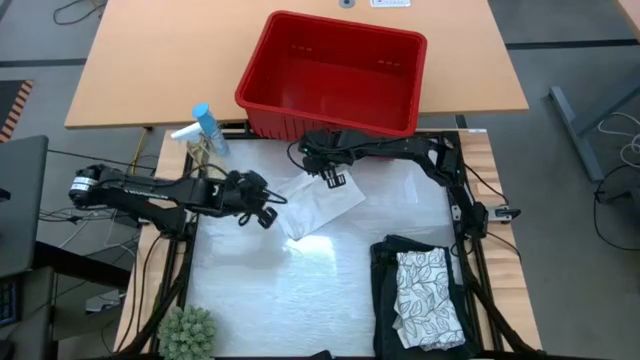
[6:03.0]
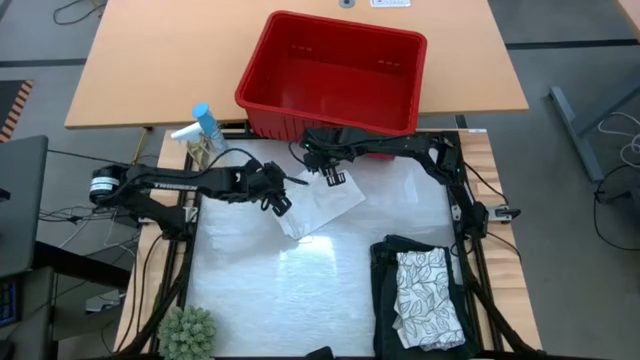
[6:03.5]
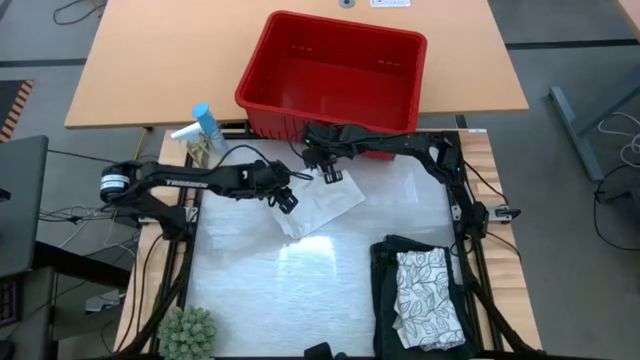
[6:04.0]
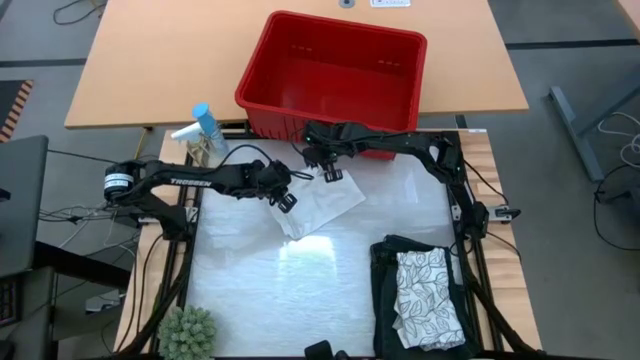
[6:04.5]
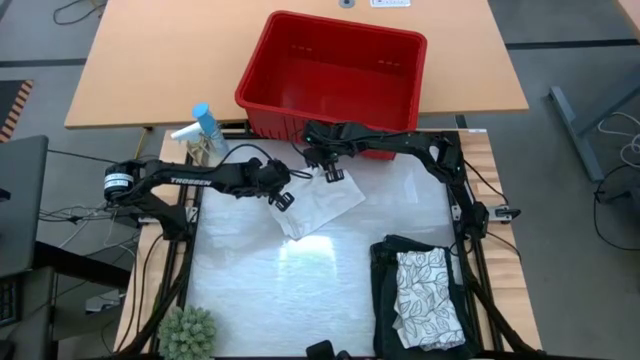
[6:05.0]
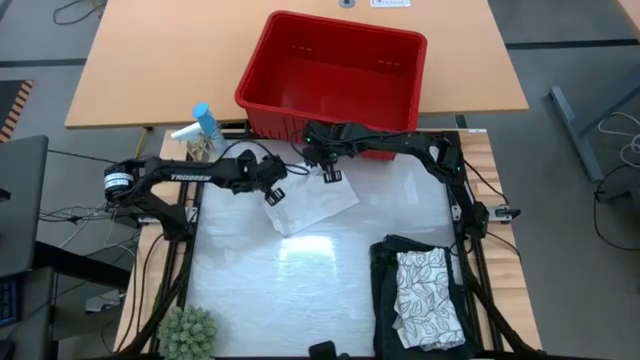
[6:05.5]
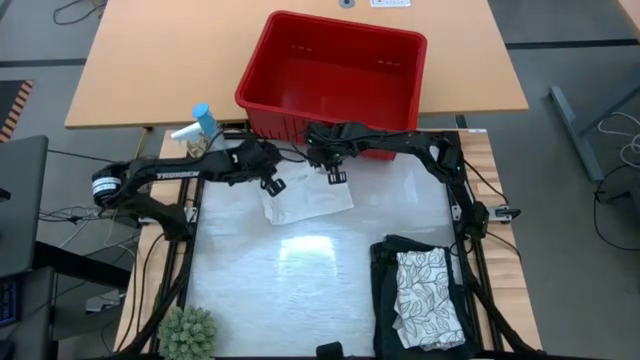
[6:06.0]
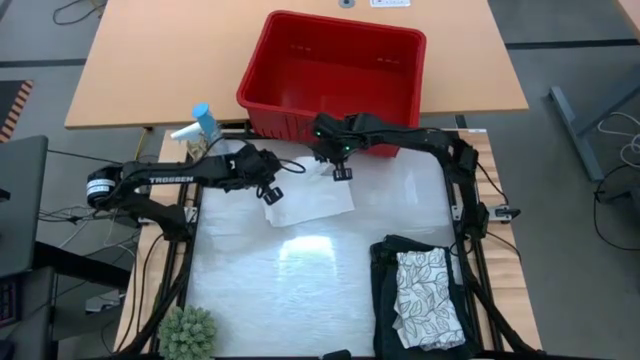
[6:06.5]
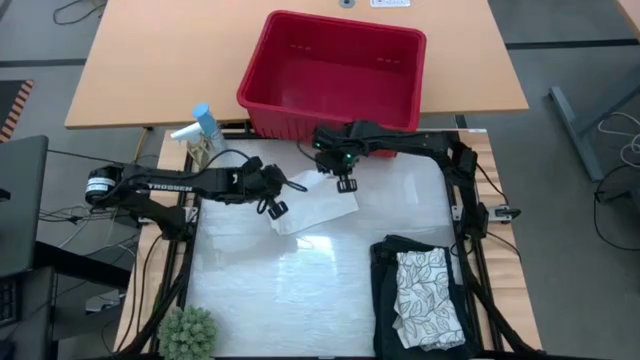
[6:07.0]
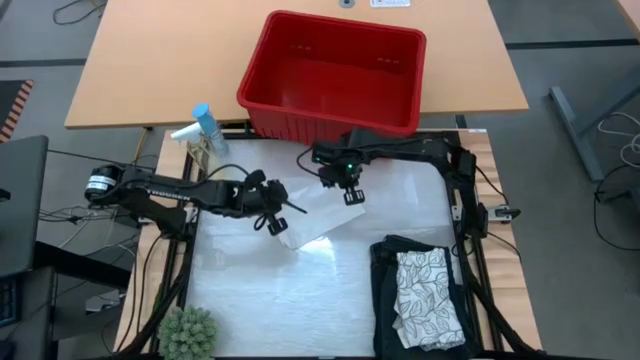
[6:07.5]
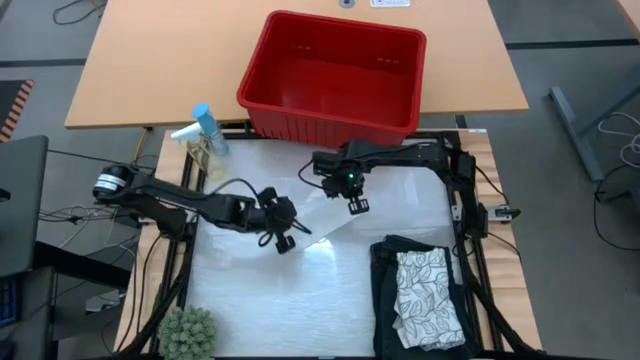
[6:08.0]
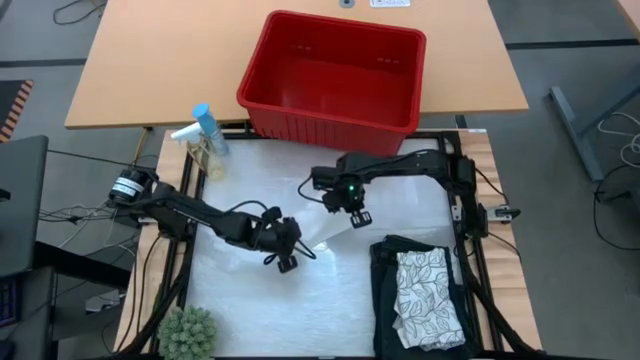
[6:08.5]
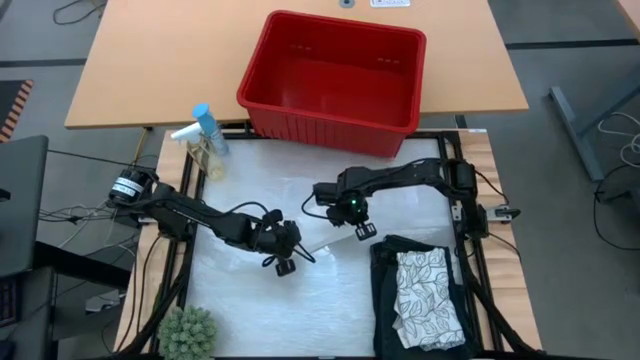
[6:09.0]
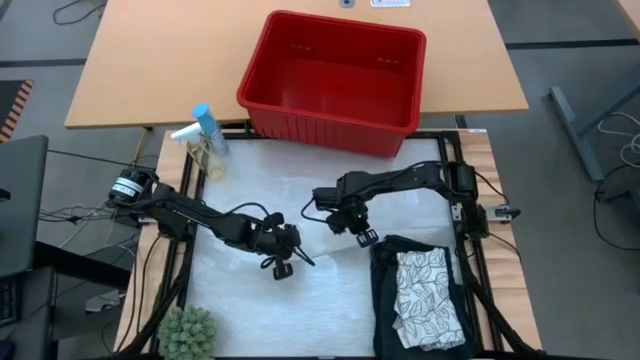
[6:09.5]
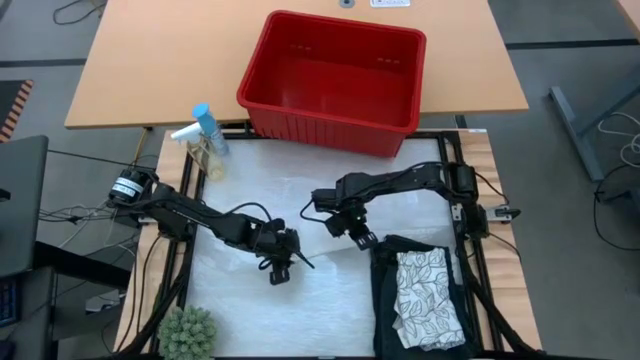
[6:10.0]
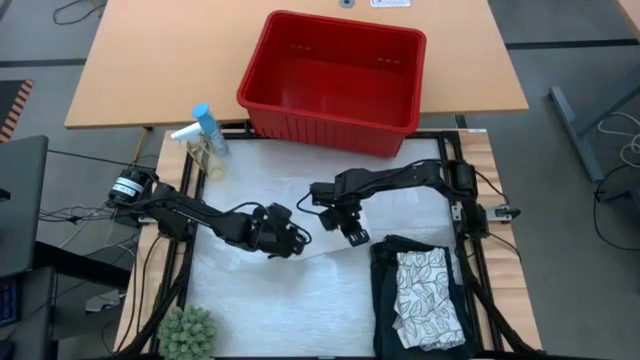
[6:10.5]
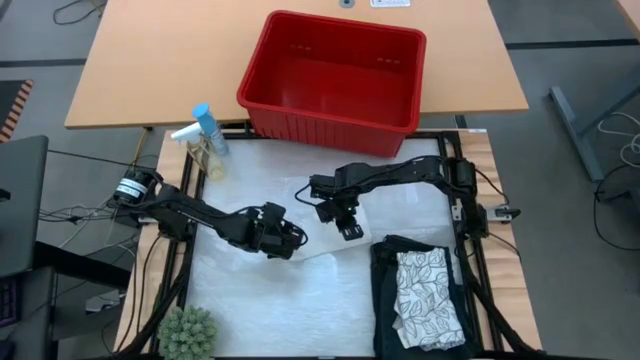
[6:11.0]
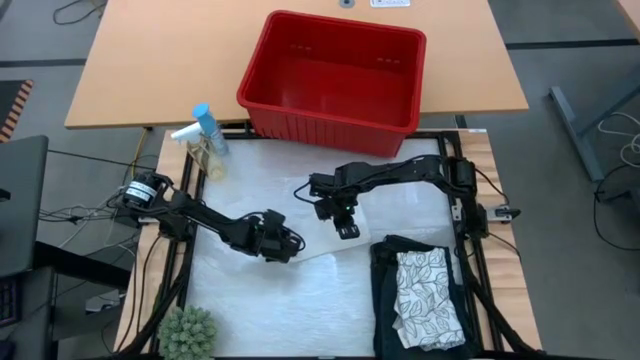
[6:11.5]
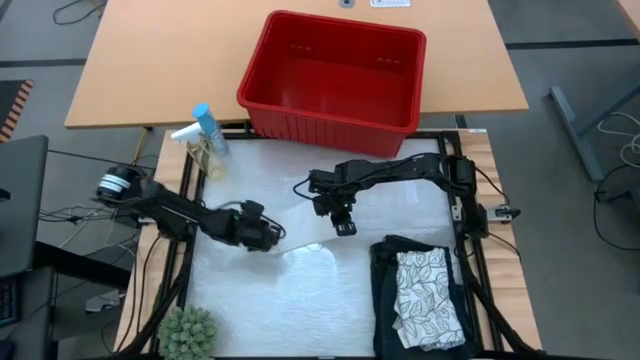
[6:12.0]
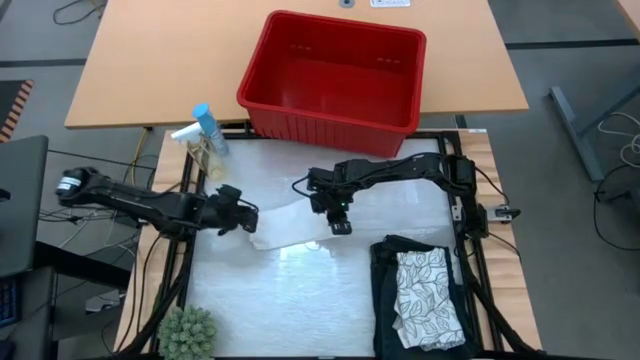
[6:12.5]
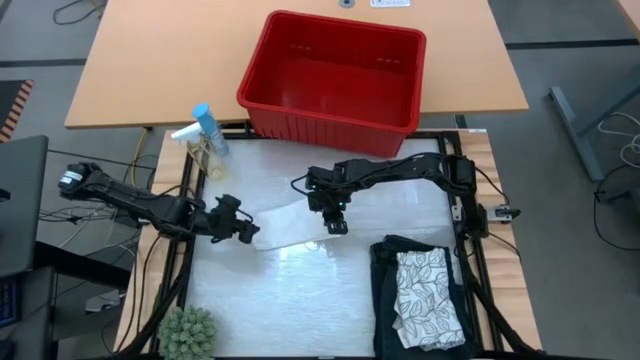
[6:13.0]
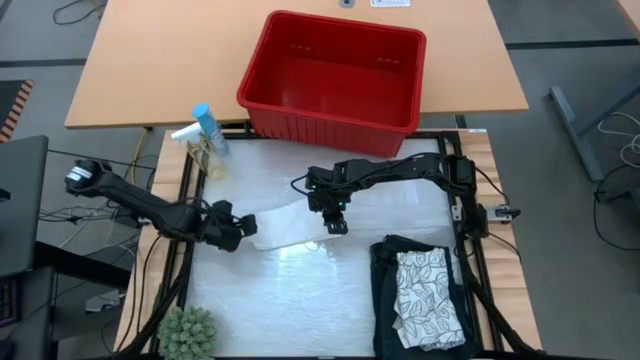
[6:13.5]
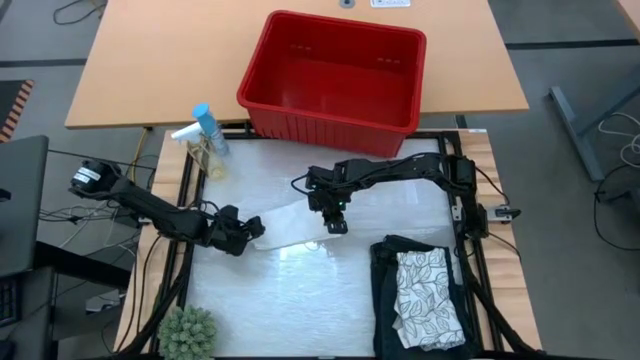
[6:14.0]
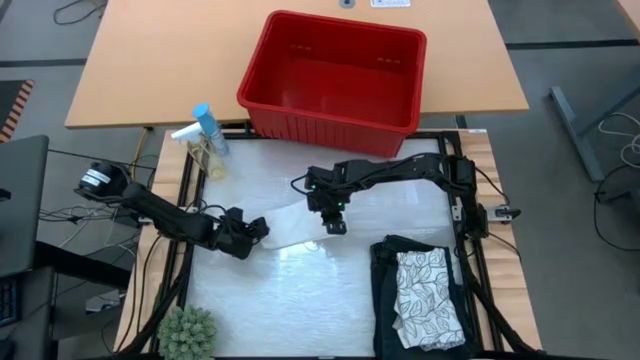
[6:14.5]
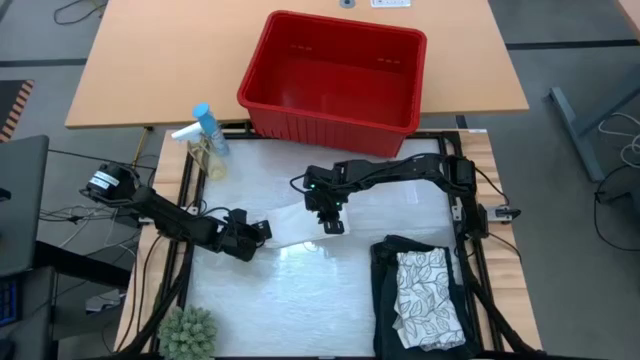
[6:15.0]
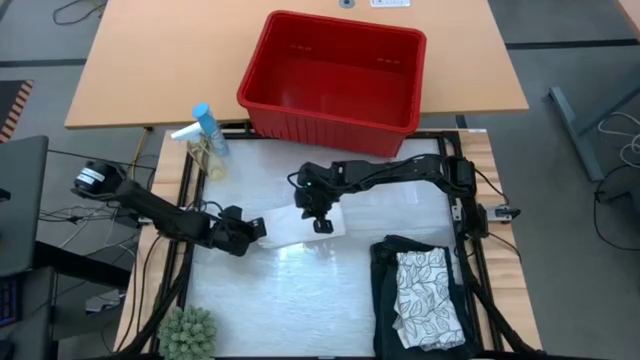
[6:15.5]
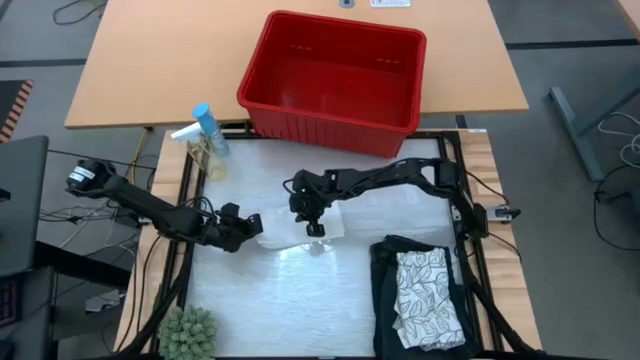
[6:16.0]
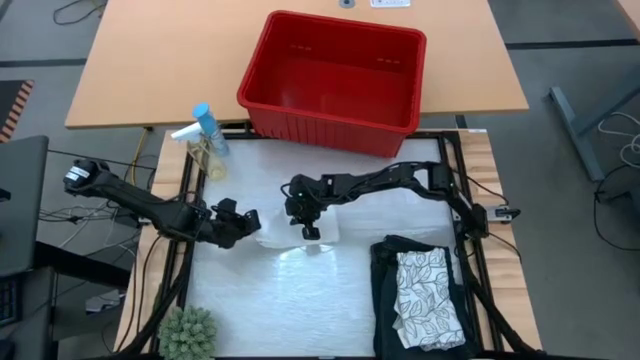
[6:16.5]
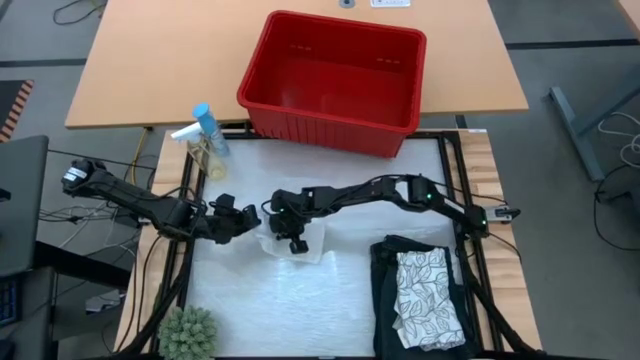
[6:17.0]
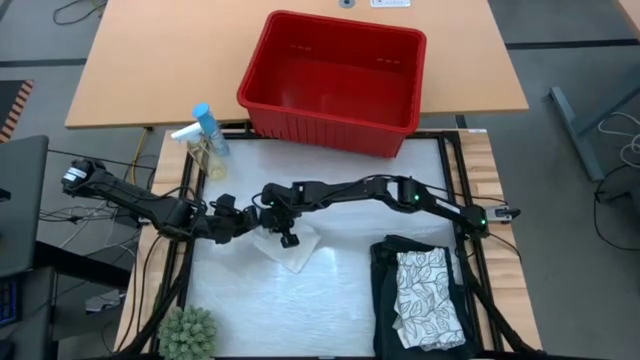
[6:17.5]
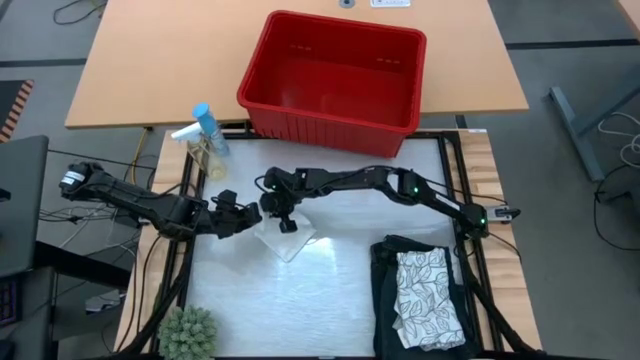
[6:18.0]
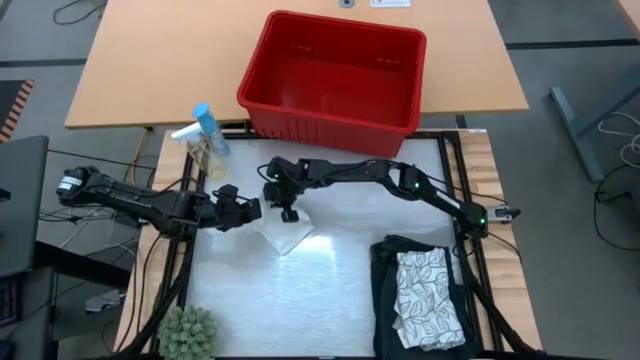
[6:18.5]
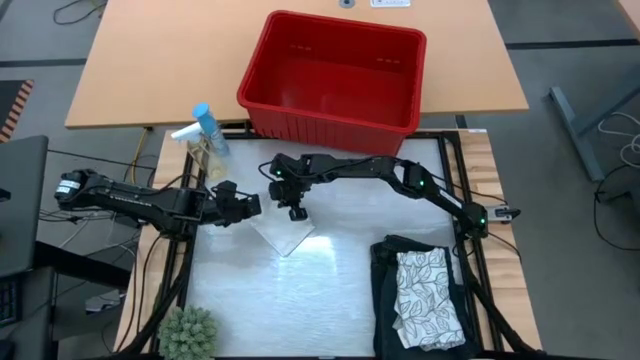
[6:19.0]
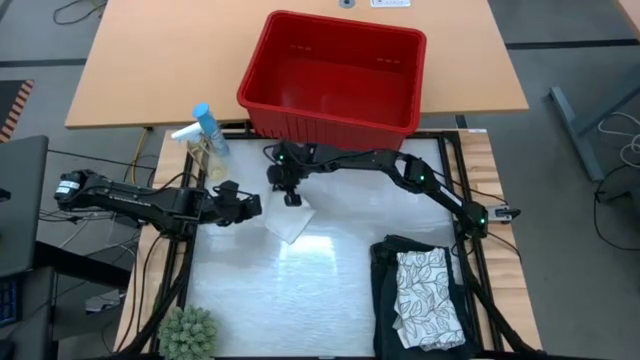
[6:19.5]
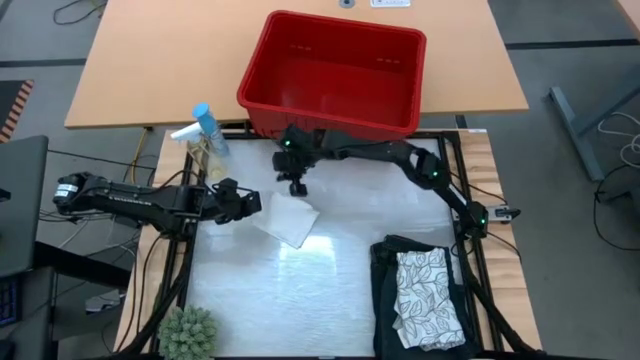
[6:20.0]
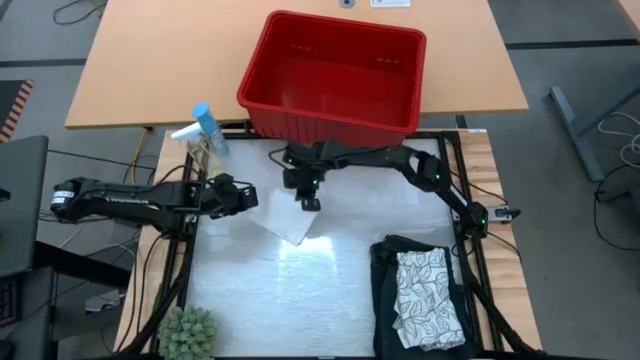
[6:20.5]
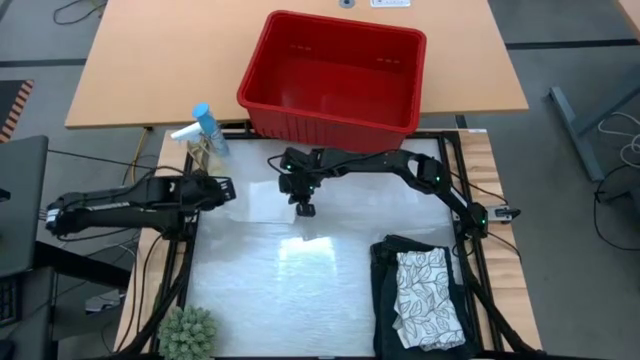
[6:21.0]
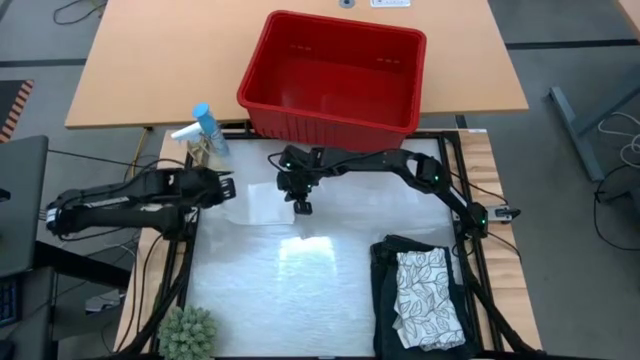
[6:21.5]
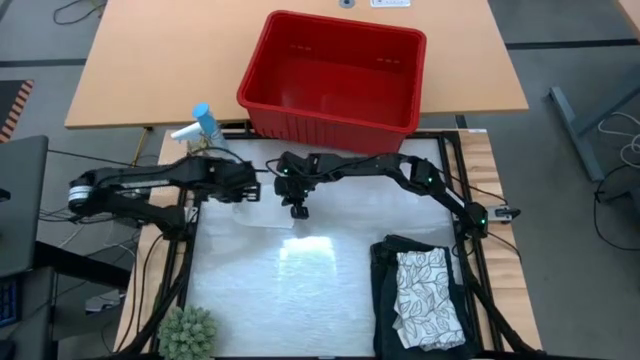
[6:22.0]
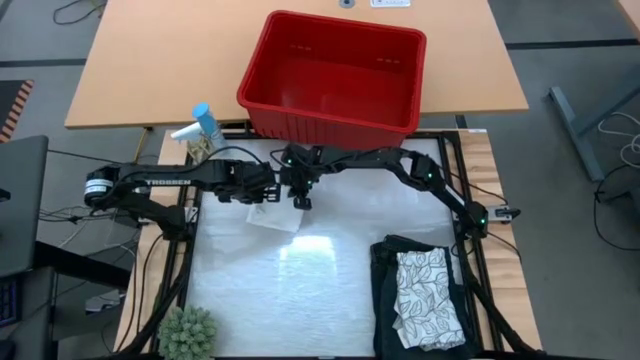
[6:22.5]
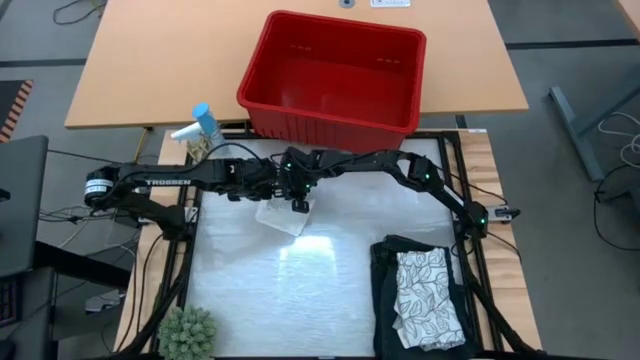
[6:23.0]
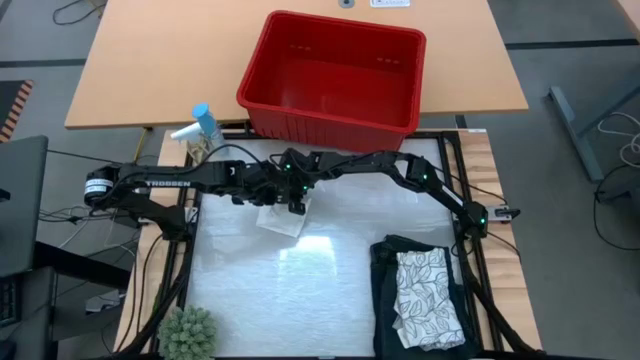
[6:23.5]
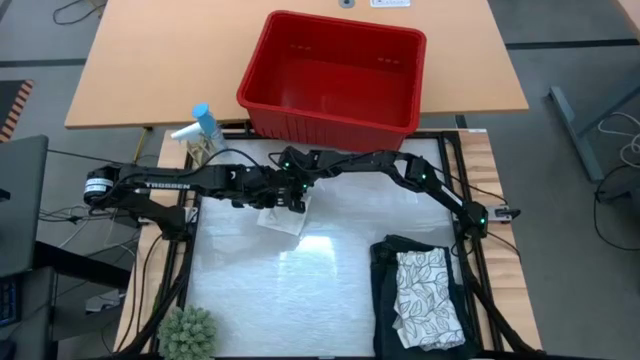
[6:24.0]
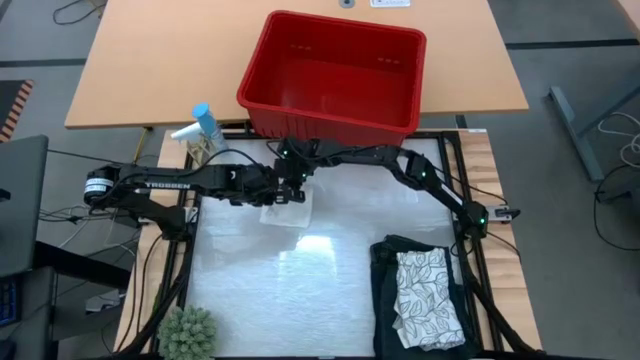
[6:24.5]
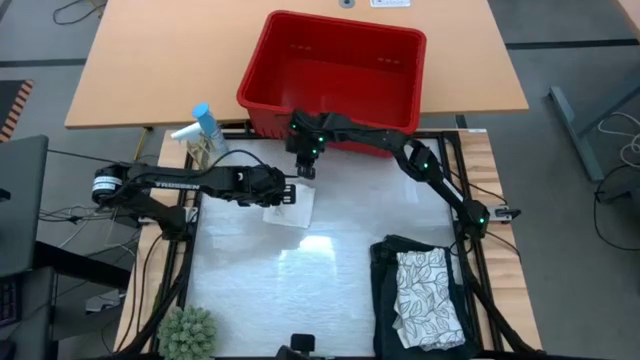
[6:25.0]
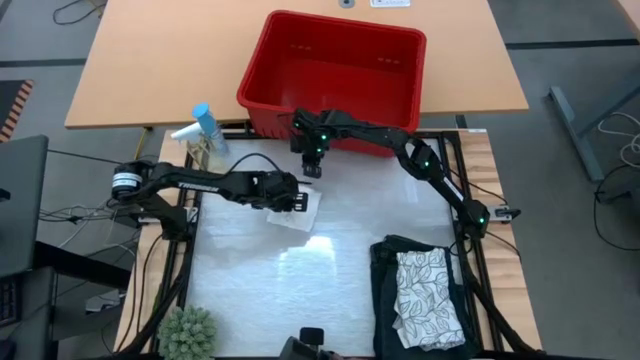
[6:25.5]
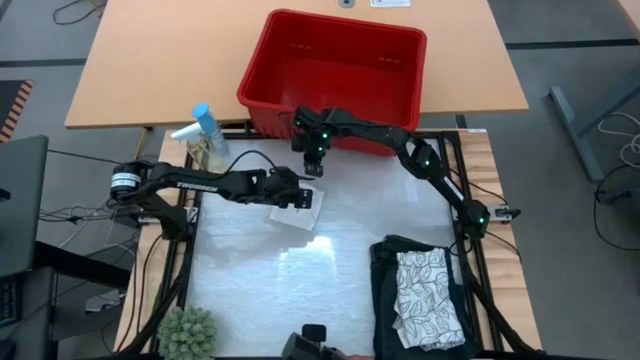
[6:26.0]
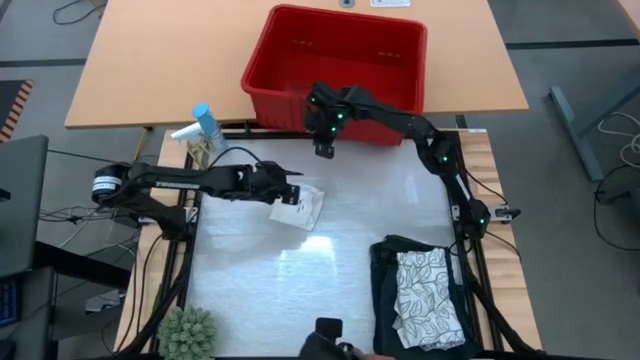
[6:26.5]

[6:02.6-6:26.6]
Task: Fold Laundry from Bin
Fold the white boxer from the red laundry bin
